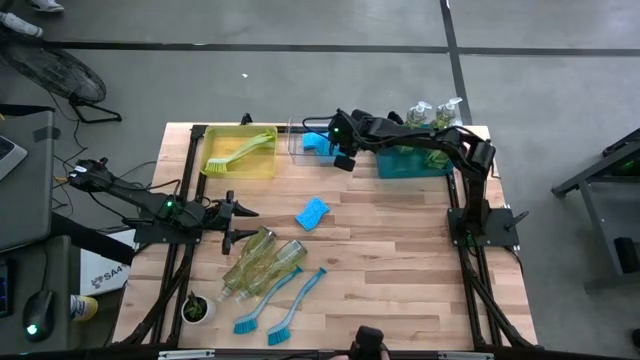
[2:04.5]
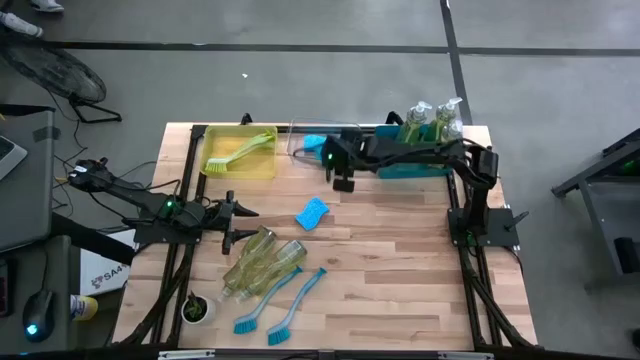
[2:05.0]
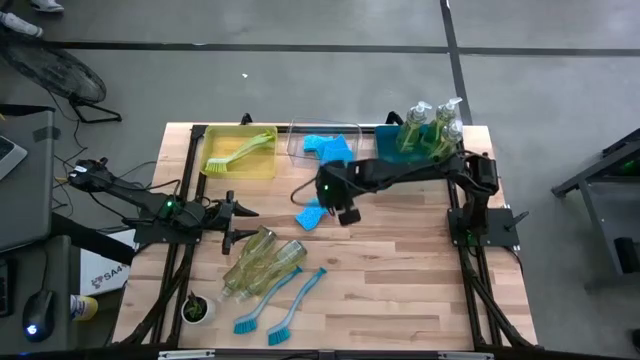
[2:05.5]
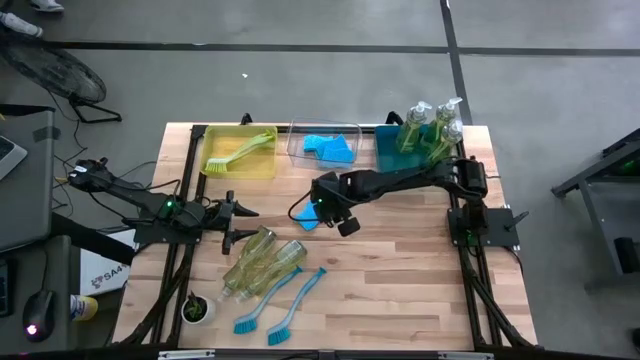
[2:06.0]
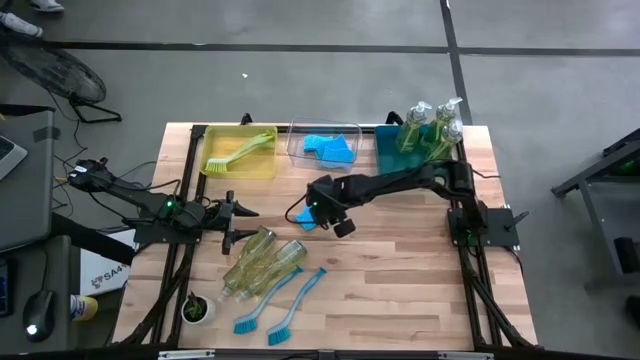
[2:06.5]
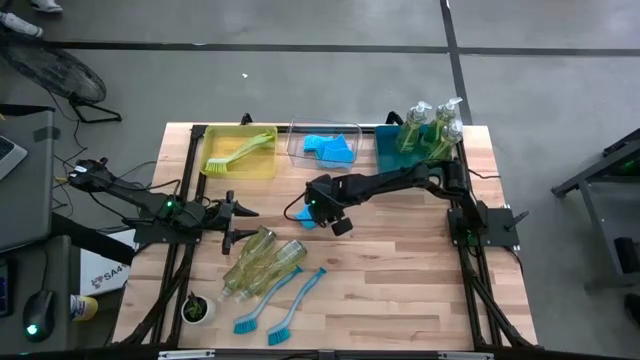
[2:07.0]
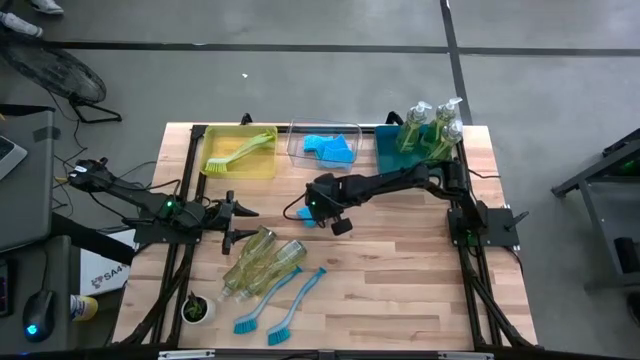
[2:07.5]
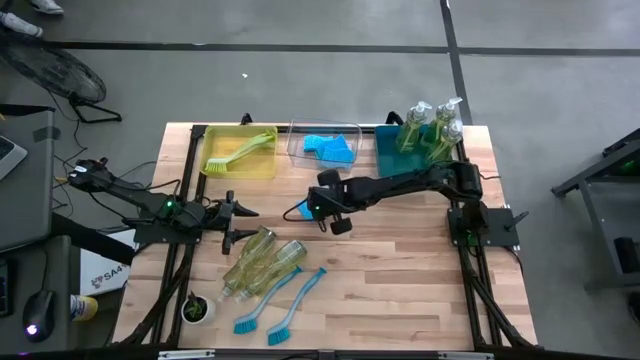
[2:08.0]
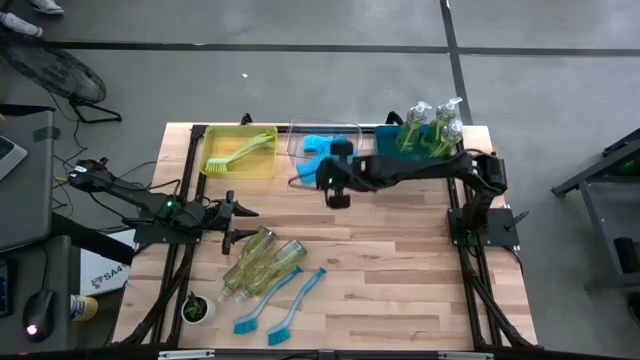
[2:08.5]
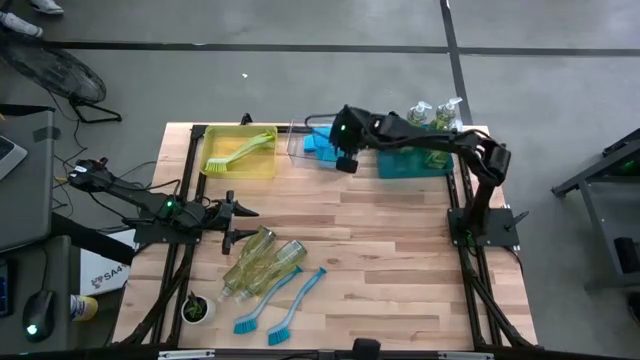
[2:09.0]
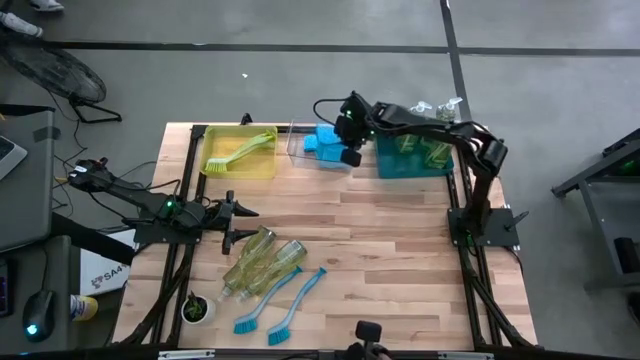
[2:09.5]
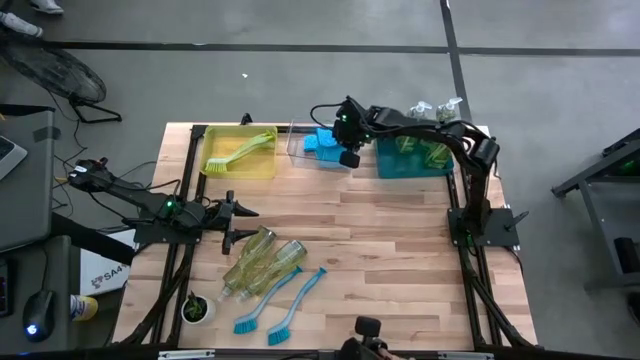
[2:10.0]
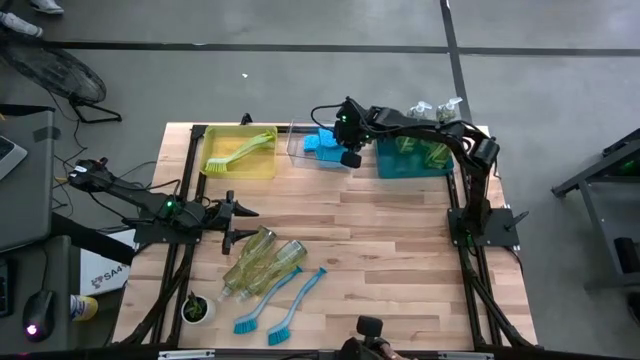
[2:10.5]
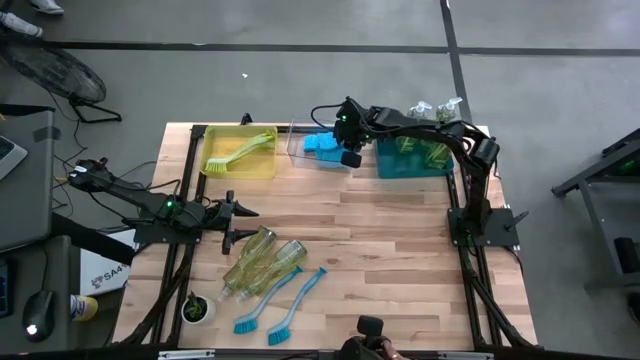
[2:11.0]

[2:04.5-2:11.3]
Task: Pick & Place Kitchen Sink Supplies
Put the sponge into the transparent bin

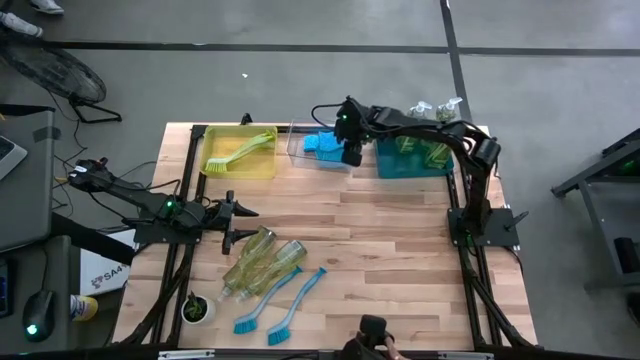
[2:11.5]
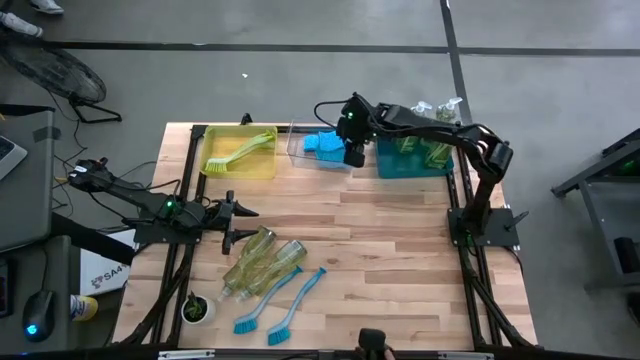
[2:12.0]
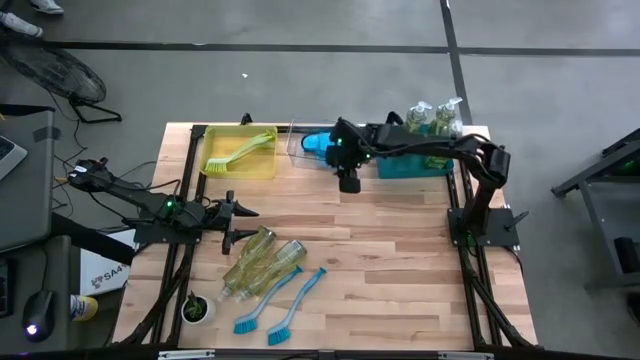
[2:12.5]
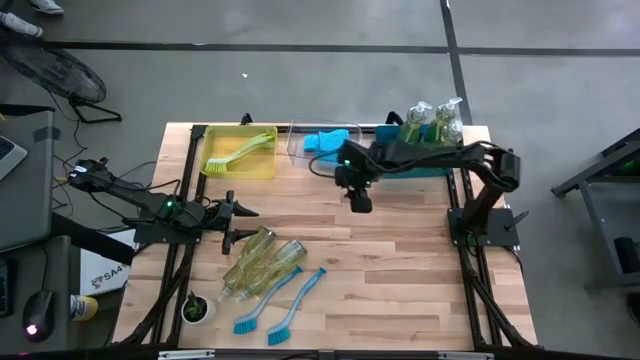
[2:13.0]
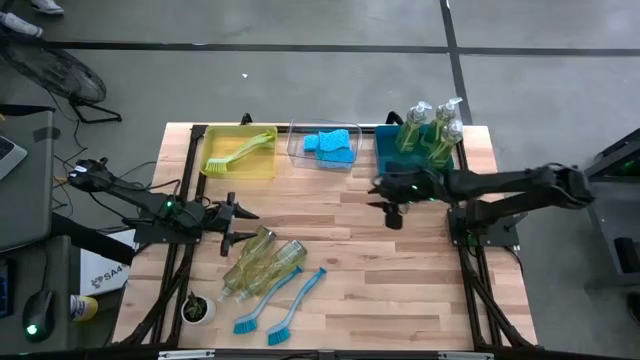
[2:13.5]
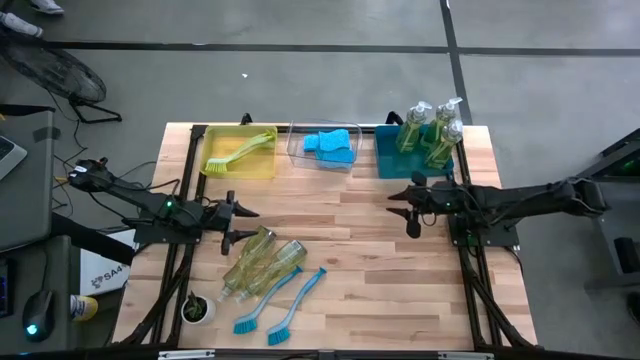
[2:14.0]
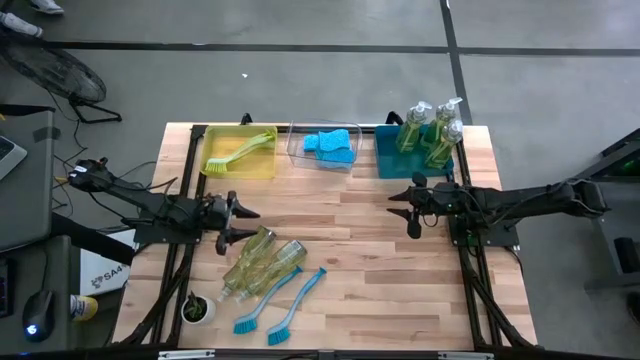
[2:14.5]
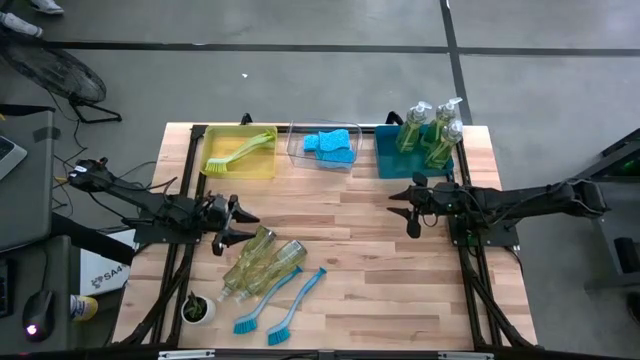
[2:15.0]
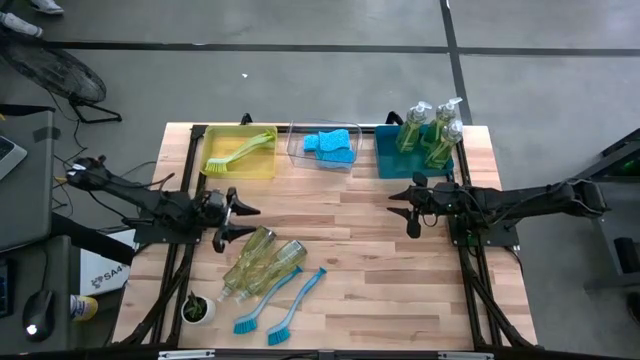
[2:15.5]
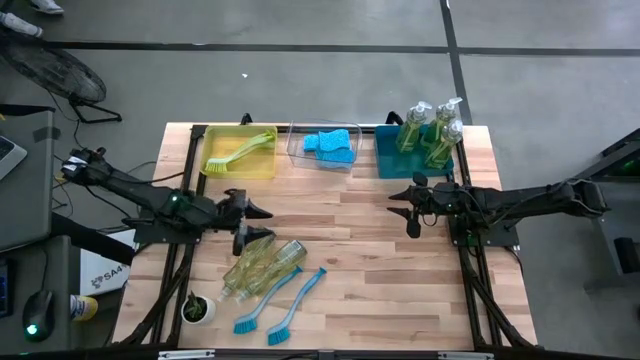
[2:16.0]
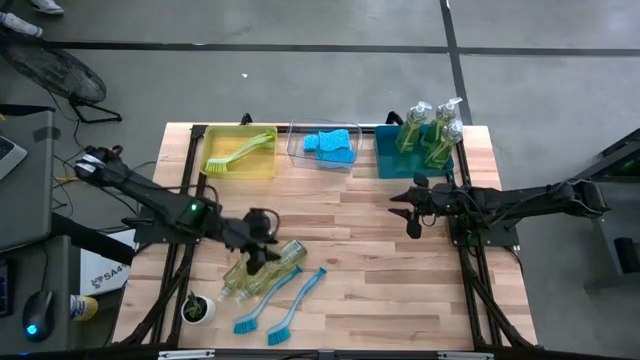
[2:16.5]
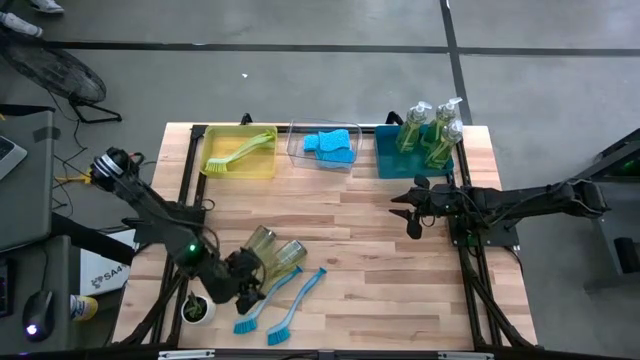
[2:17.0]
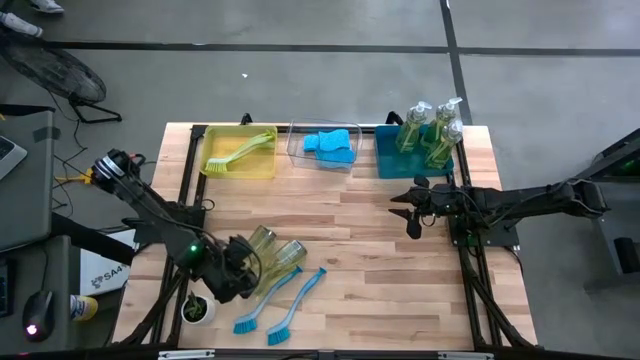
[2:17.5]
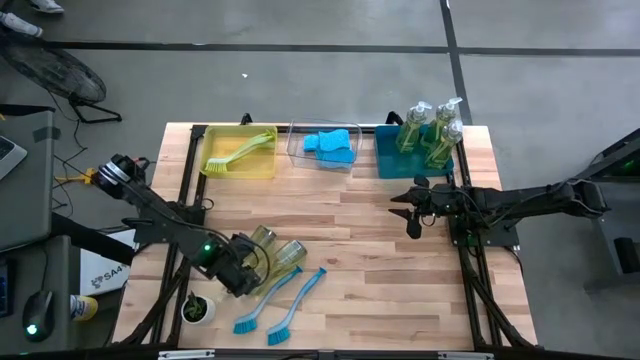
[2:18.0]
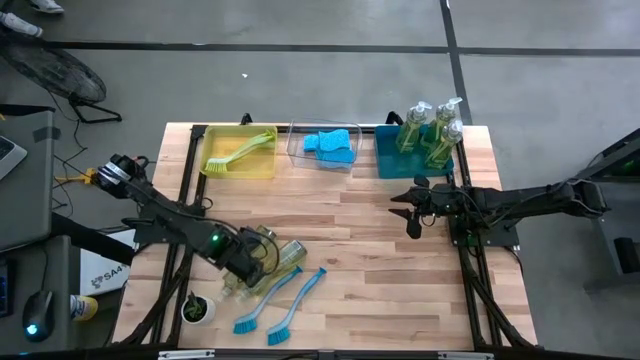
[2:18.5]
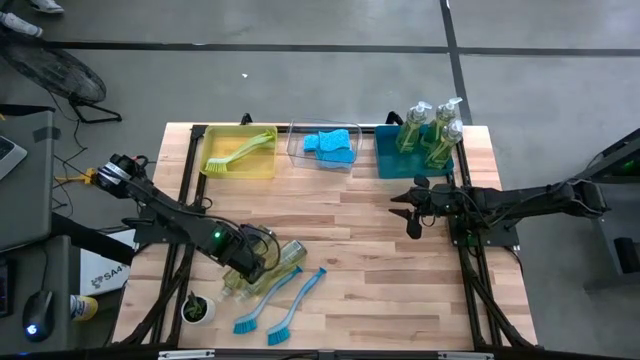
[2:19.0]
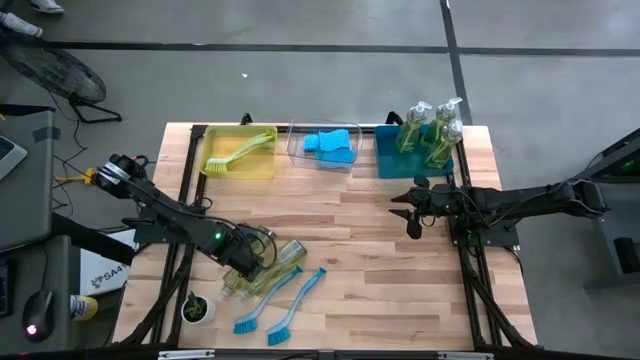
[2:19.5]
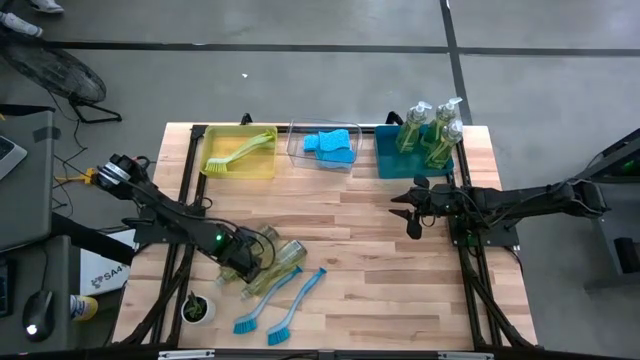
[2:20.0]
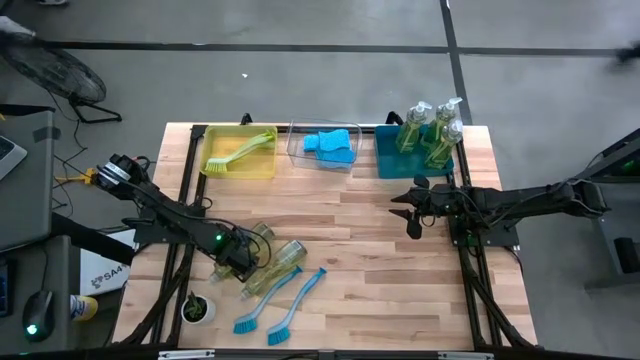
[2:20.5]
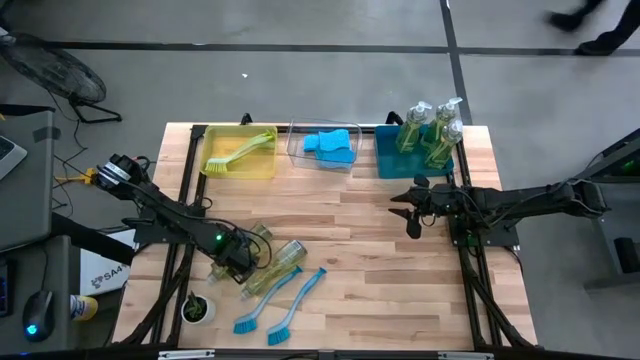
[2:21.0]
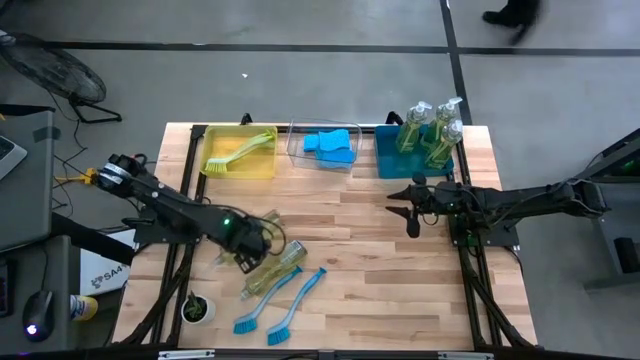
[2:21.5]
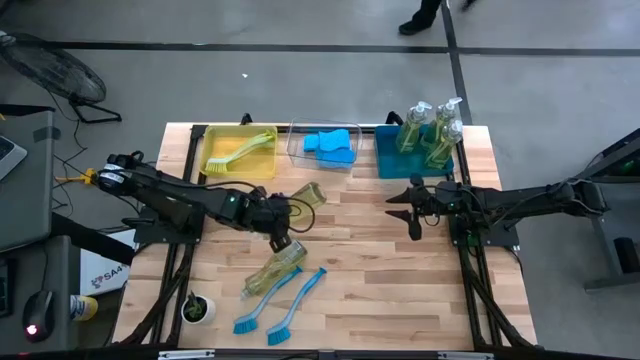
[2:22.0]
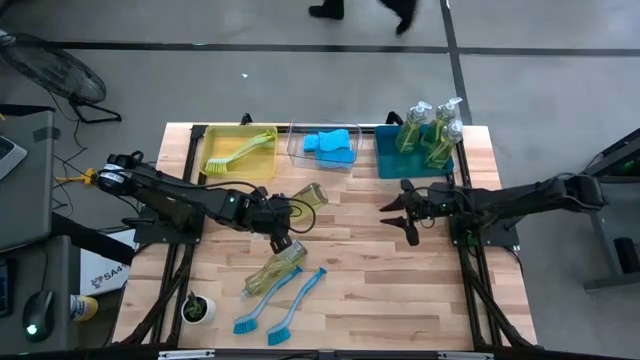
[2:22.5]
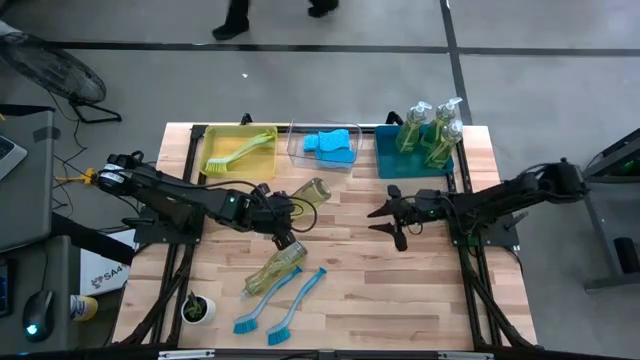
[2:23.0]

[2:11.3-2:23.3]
Put the dish soap into the blue bin

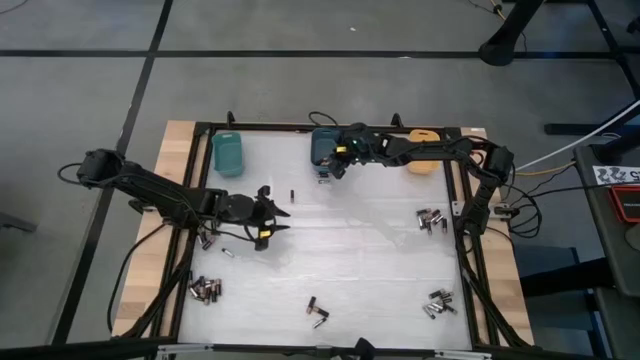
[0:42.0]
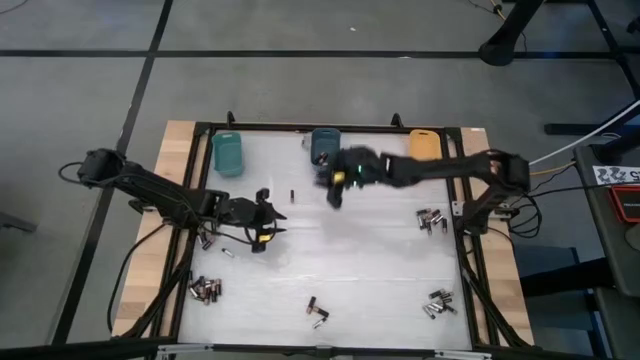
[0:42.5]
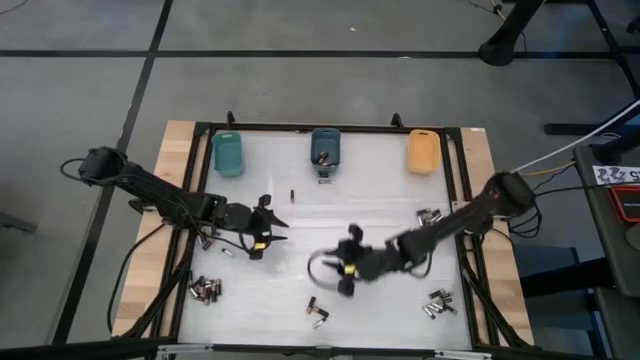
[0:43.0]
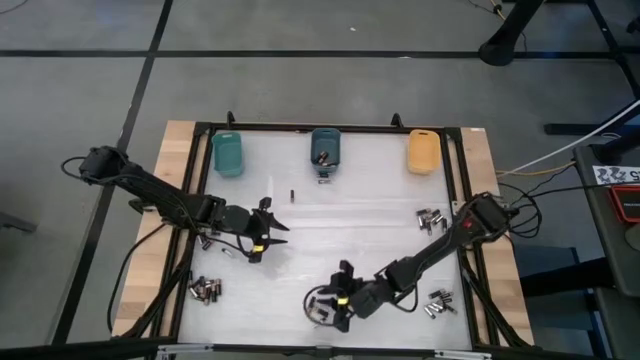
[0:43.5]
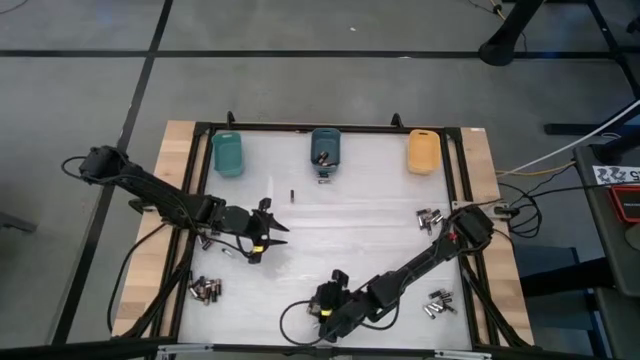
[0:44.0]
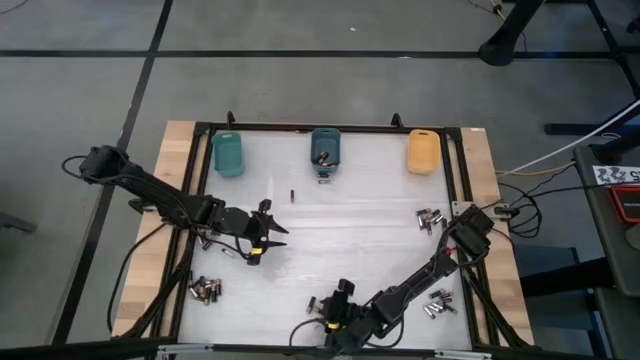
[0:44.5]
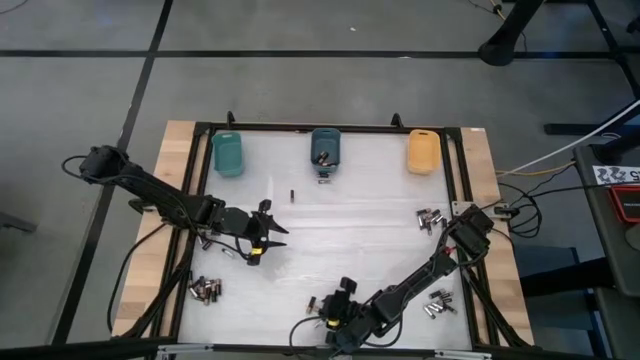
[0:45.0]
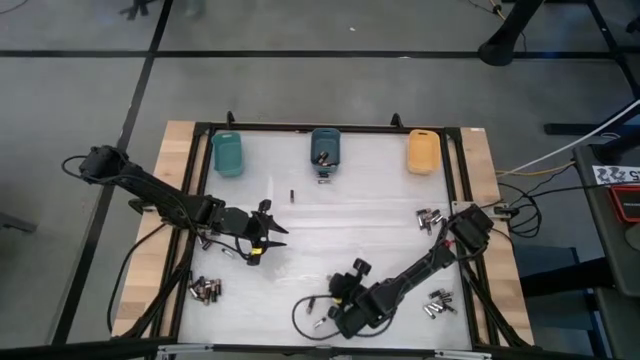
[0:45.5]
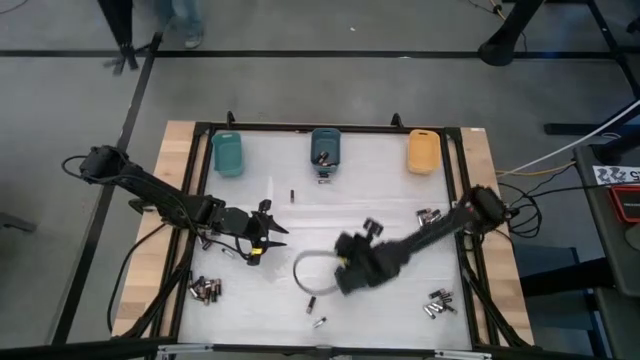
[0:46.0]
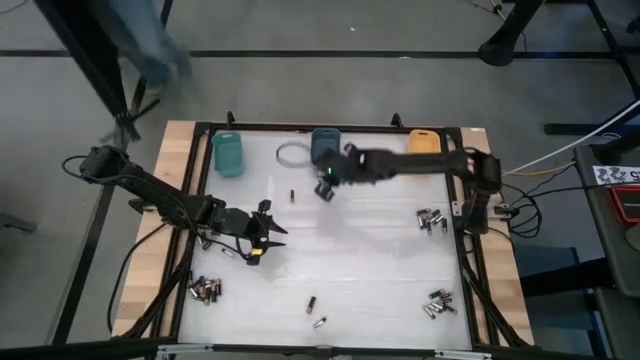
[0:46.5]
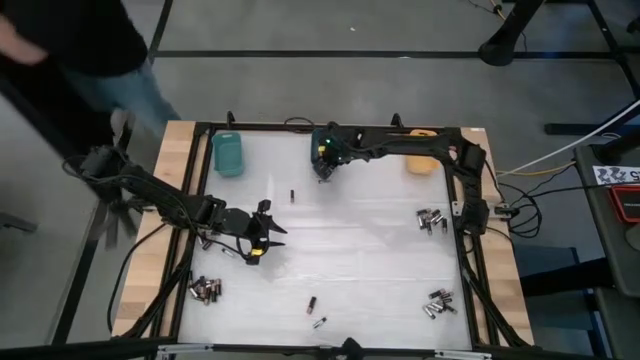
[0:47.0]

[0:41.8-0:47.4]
Task: Sort batteries
Put the brown battery into the blue bin
